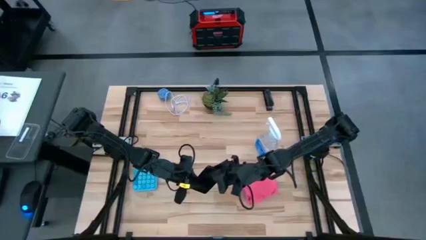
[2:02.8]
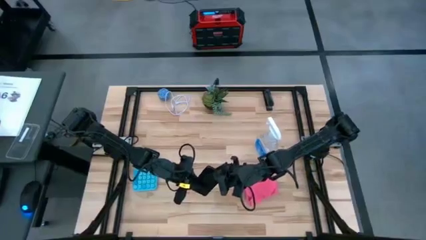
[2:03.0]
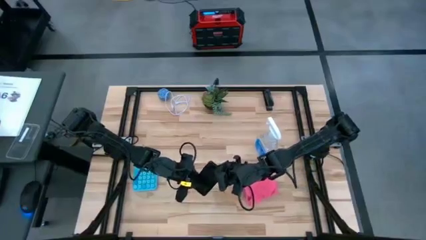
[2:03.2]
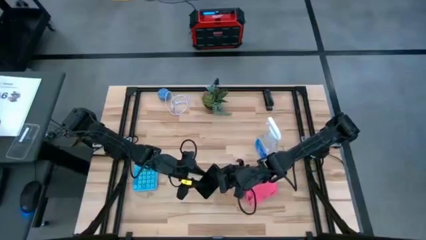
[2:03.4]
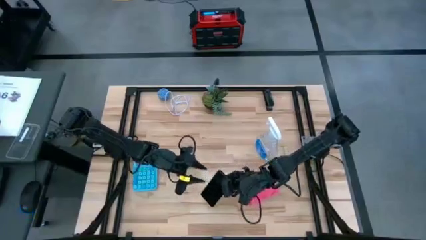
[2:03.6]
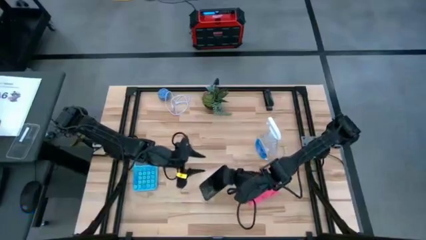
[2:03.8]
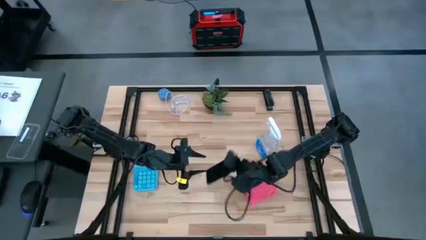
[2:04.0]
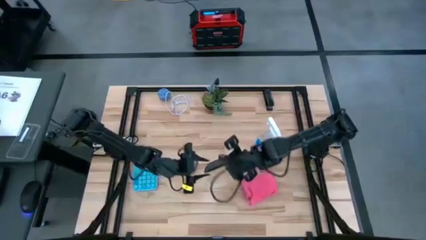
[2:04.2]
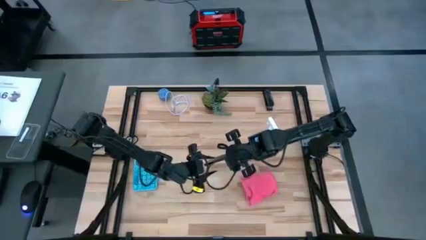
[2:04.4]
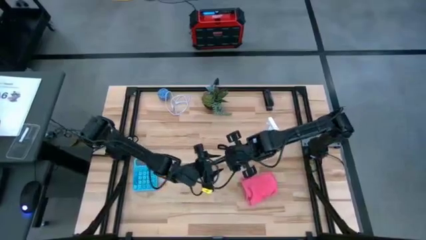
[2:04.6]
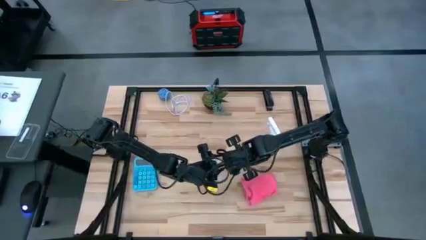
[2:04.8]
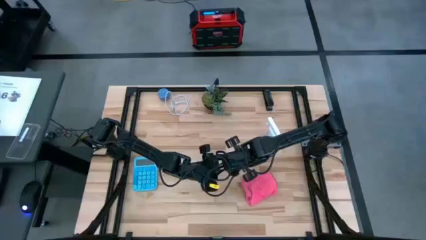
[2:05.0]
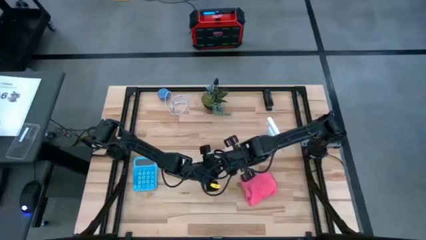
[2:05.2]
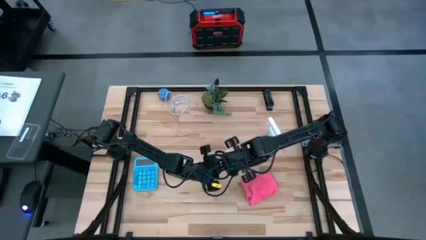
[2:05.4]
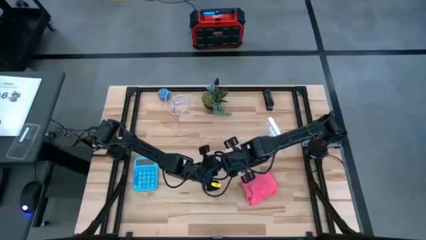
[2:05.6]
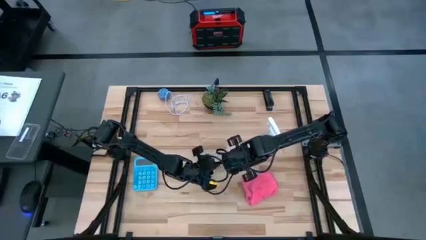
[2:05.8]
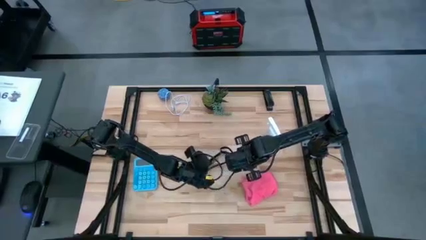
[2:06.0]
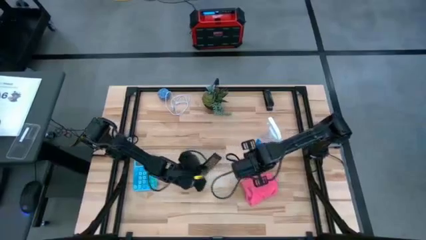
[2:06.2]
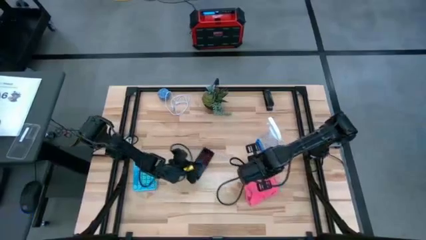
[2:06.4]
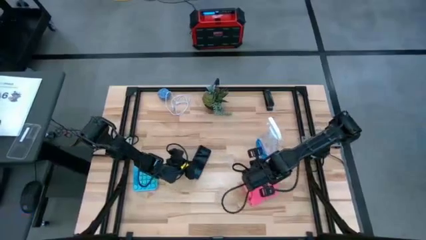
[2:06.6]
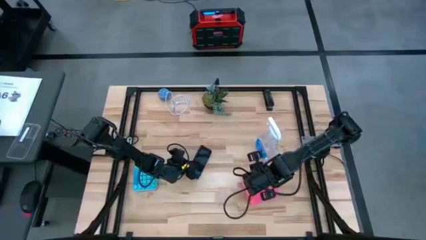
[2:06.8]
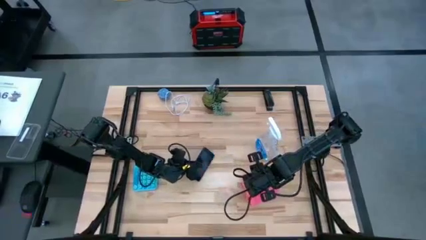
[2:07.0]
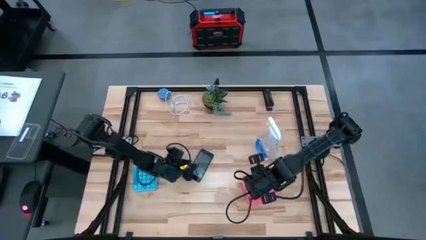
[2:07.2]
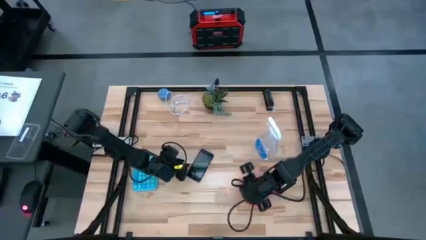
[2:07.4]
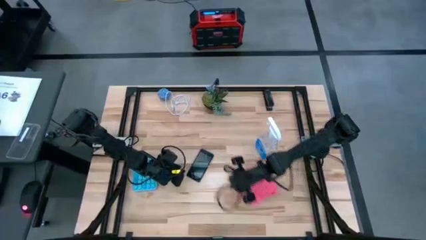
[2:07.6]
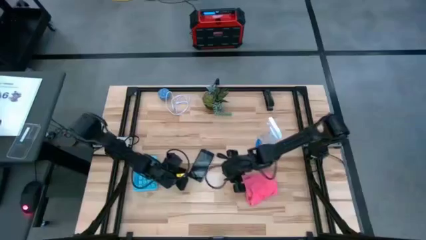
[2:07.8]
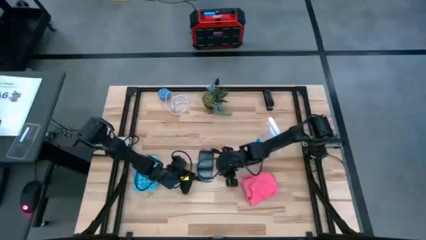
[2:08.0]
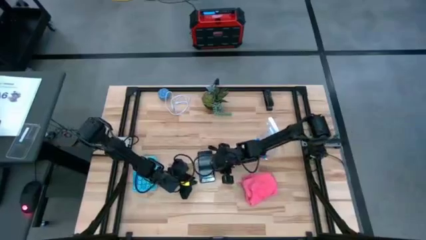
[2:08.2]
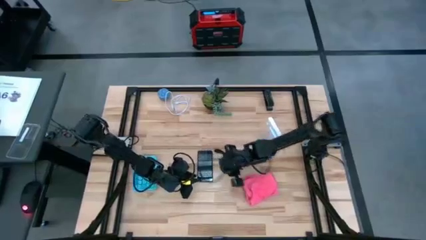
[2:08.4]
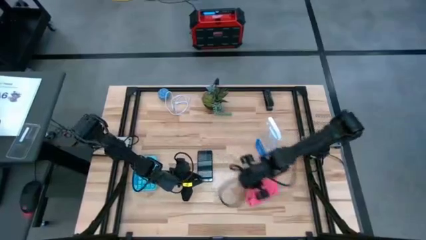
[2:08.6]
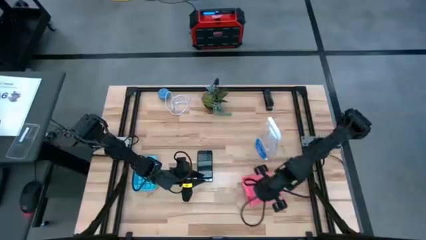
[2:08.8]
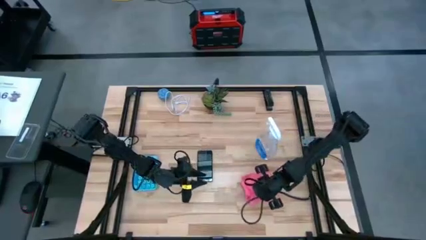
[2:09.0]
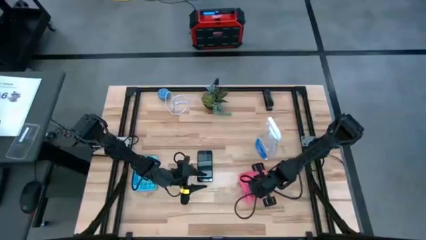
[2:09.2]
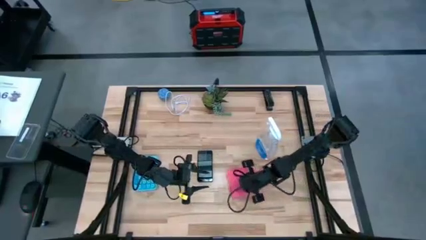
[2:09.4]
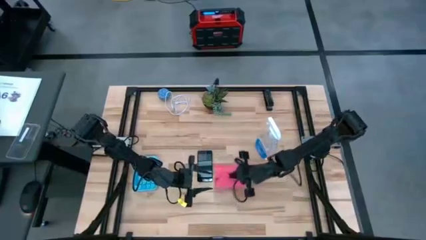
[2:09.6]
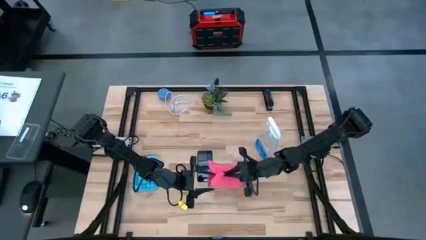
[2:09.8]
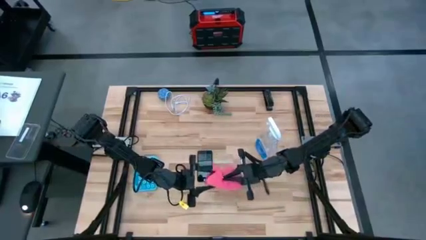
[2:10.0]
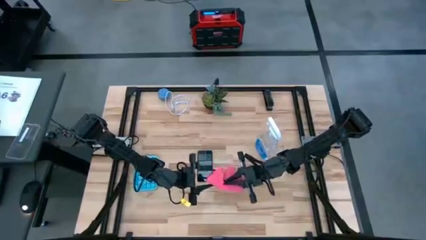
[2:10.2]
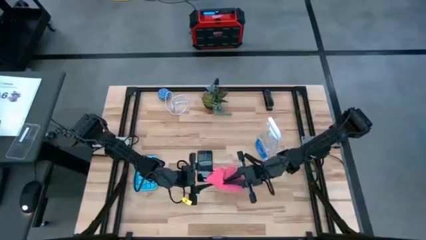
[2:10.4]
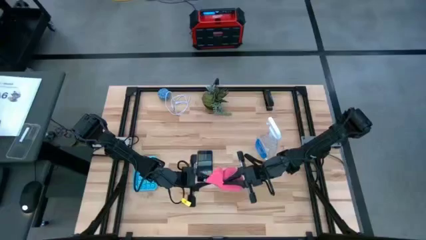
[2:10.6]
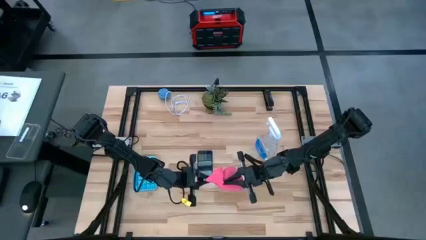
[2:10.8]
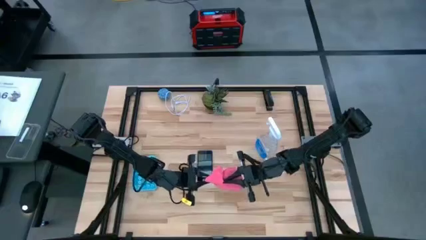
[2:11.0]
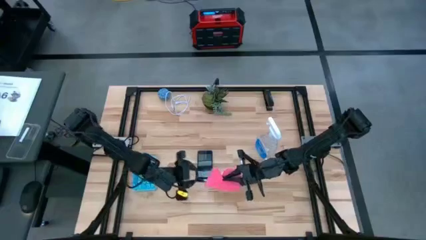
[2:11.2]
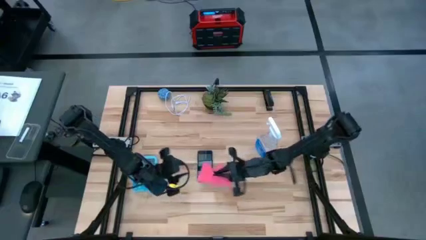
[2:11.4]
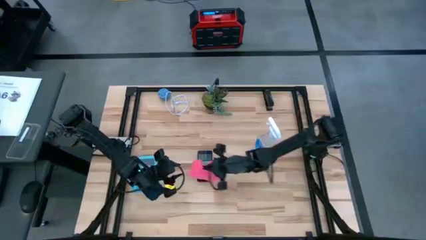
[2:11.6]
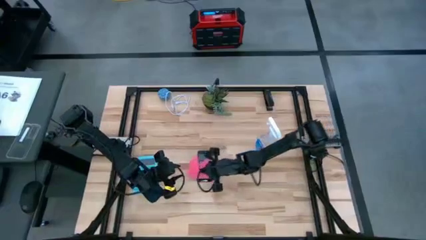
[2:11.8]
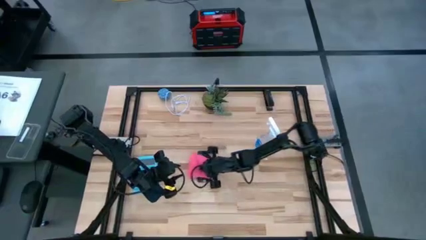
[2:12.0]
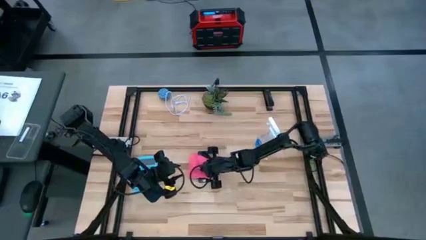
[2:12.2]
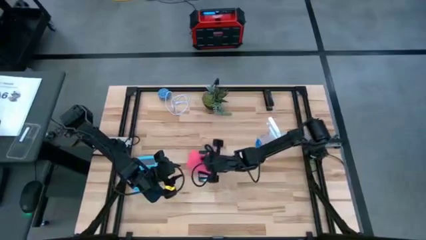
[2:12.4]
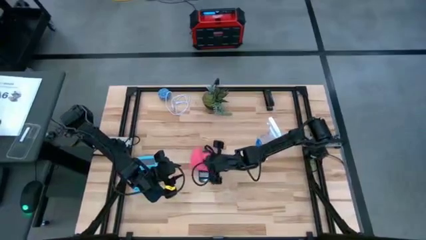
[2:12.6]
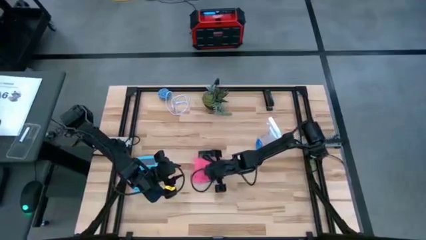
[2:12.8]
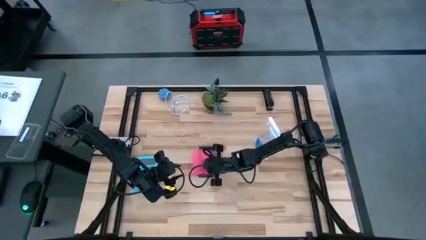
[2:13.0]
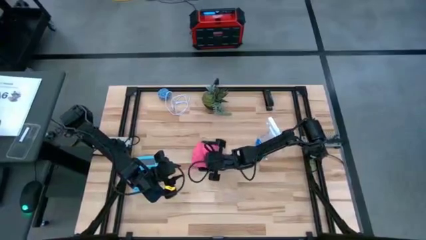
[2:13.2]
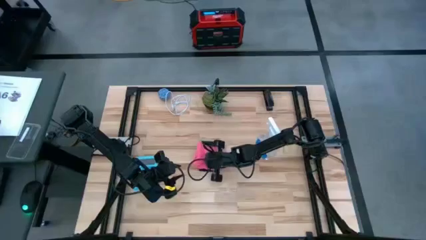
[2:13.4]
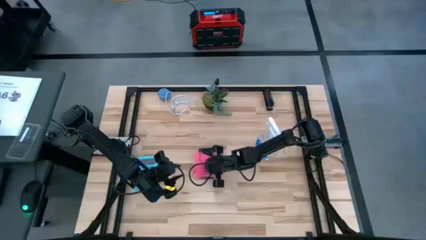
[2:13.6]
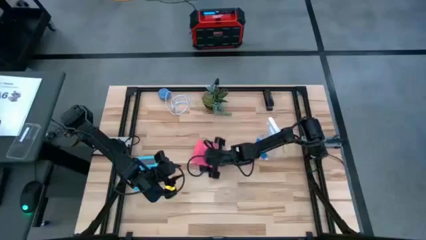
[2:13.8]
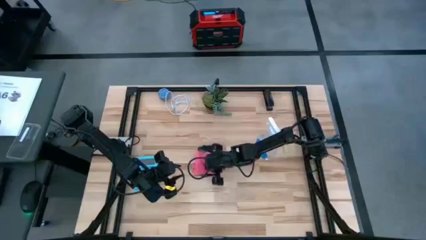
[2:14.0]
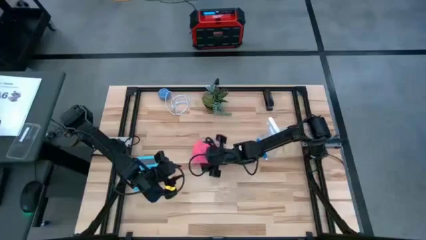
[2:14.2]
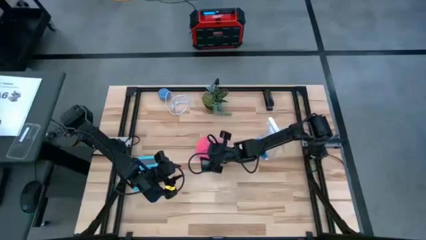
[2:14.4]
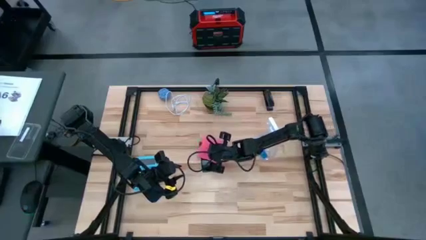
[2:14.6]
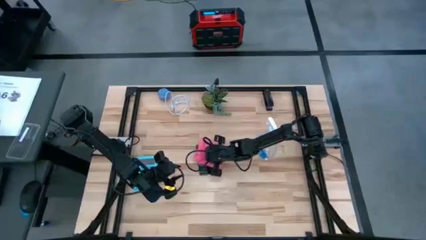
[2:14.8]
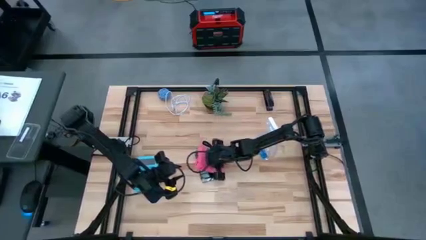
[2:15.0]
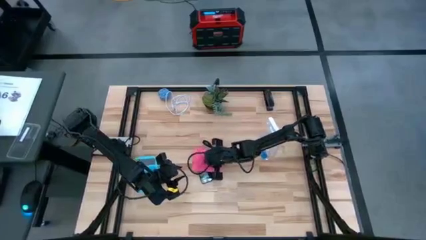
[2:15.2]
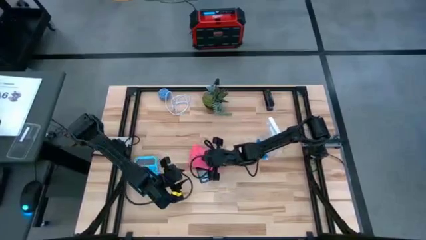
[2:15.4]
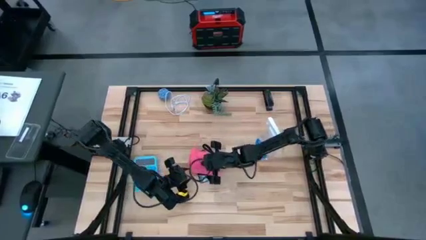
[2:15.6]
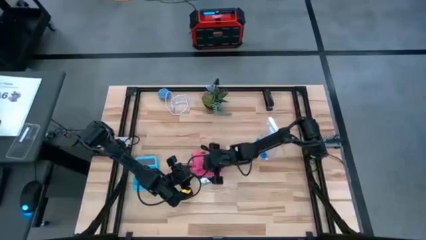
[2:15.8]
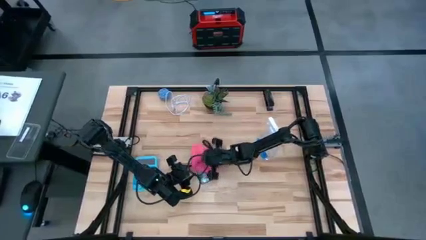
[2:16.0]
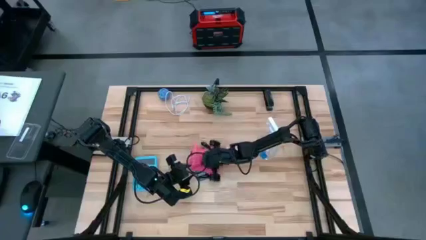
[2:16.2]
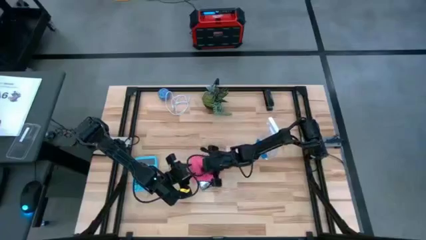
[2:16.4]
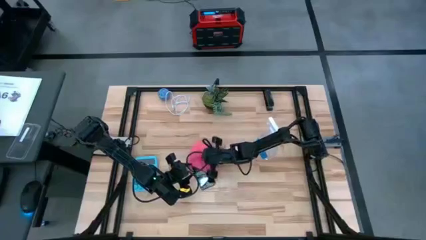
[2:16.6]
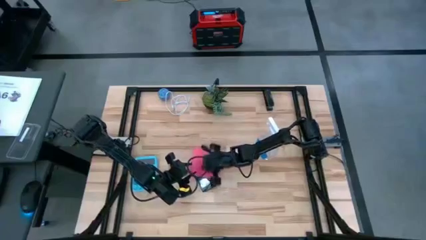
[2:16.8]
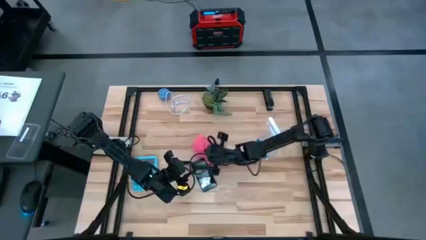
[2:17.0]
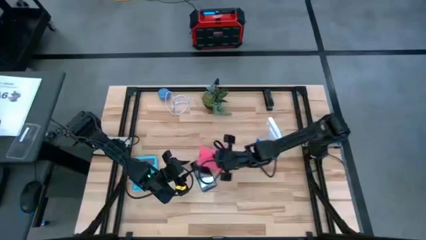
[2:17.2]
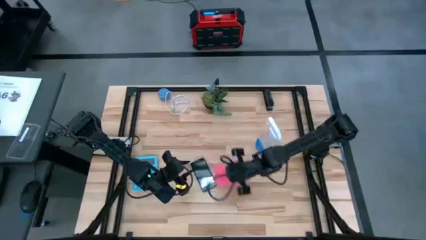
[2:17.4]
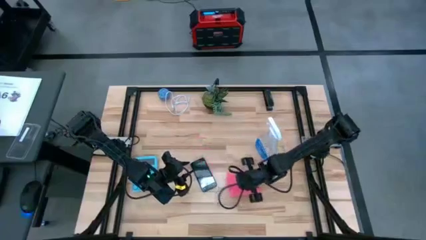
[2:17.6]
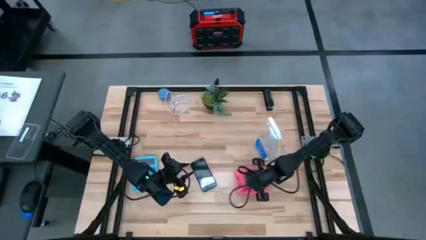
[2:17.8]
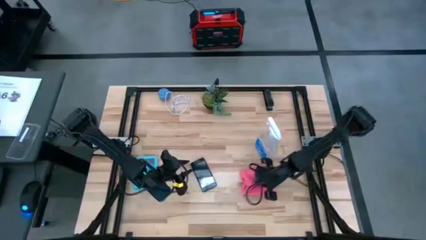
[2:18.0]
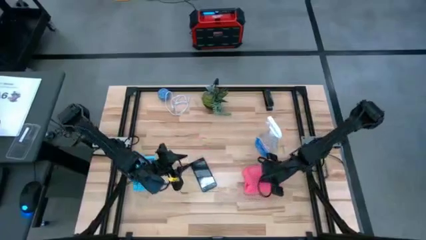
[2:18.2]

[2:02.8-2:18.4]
Task: Apply microfiber cloth
Wipe the back of the cellphone with a microfiber cloth

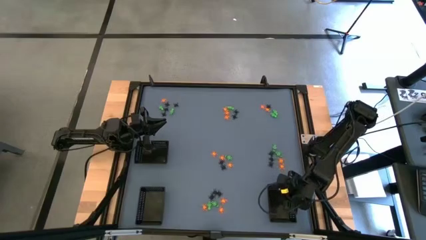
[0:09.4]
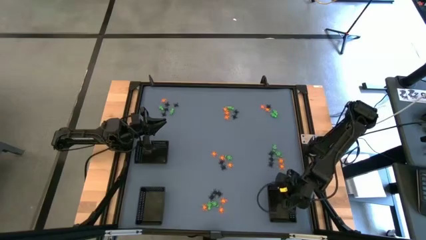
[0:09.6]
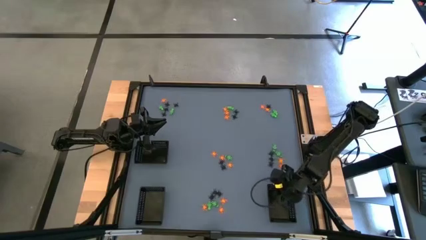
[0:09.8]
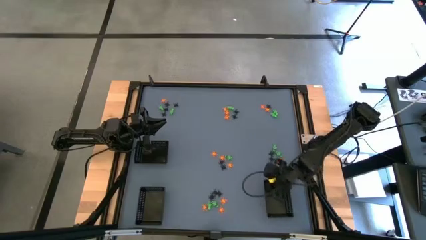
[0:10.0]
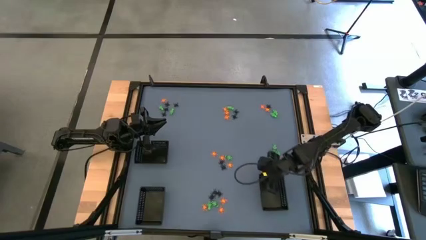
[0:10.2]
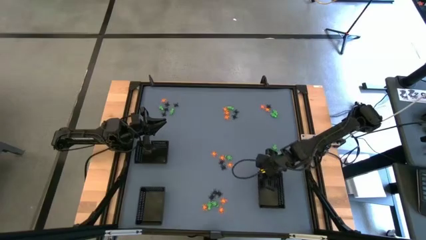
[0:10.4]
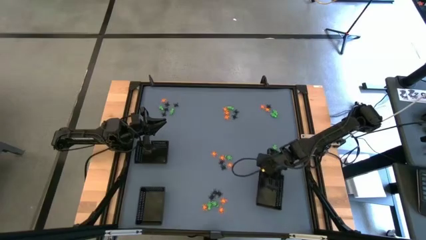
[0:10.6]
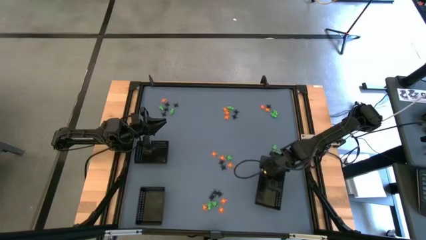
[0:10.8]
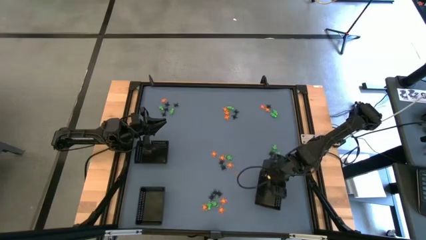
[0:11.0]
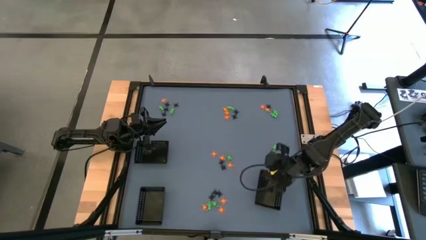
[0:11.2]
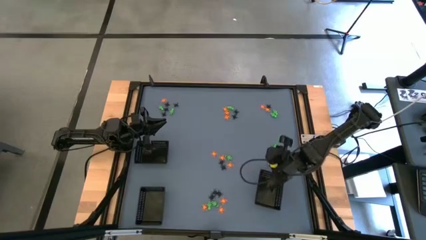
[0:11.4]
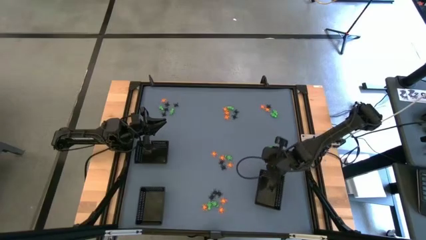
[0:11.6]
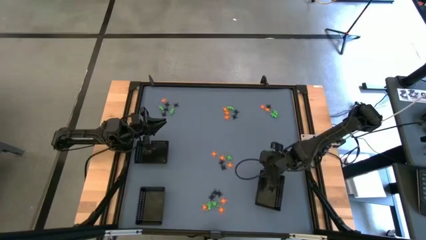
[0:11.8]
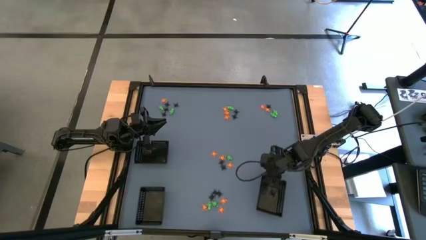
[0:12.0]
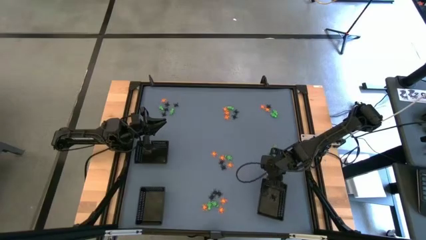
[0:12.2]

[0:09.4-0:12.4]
Task: Sort Halloween decoration
Adjust the bottom right black bin
